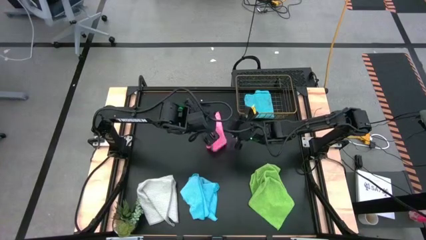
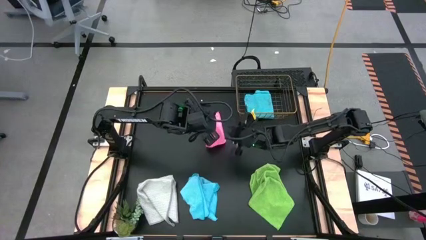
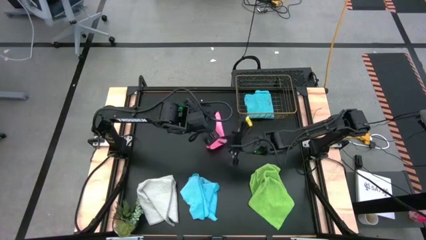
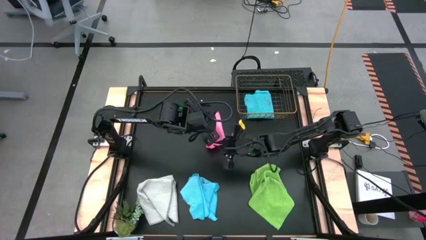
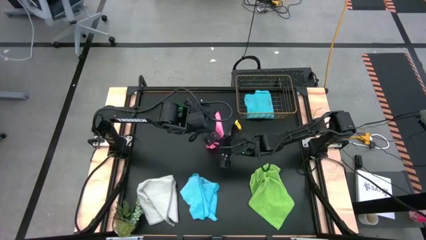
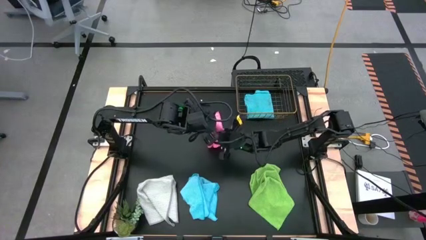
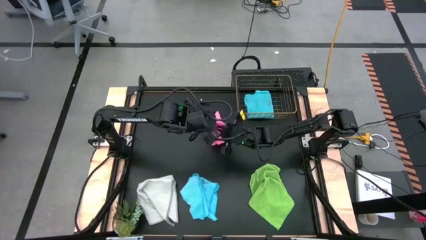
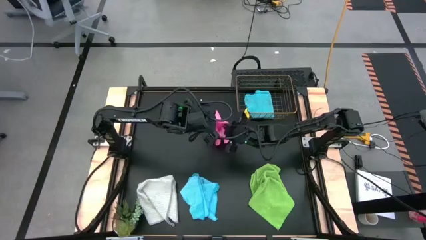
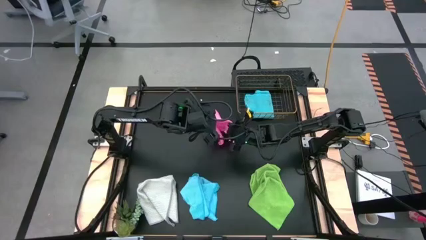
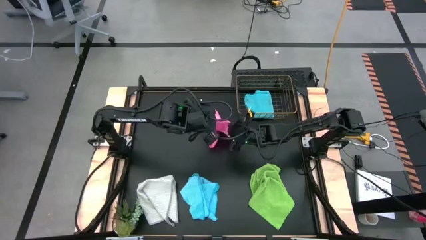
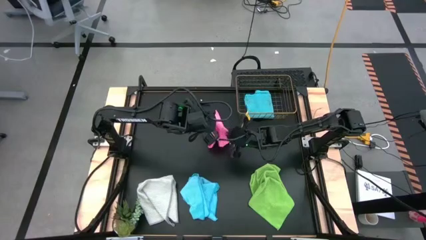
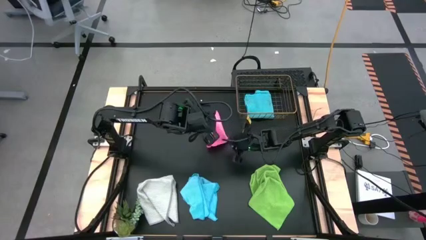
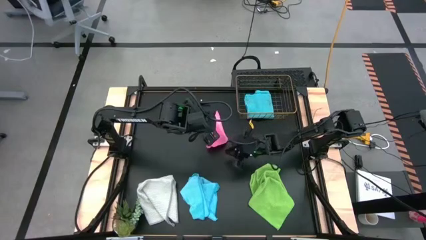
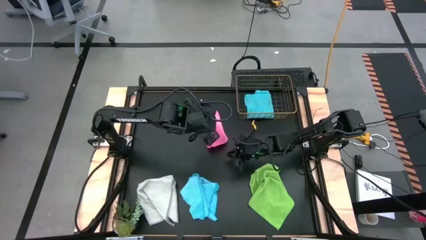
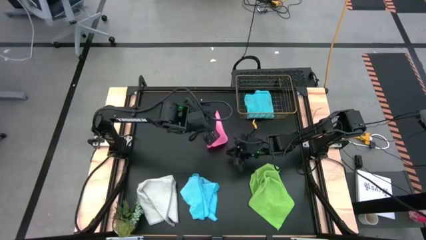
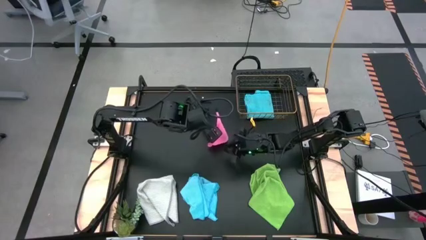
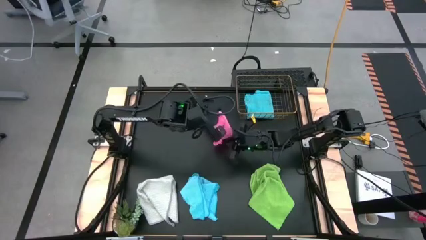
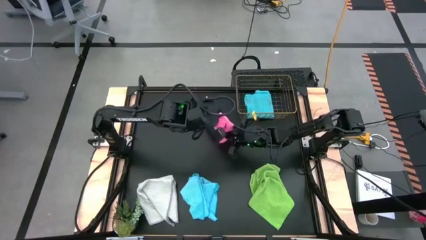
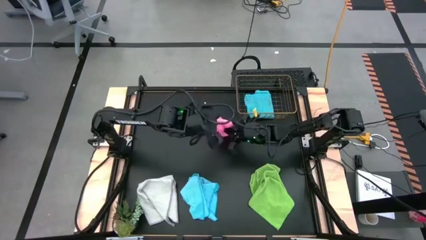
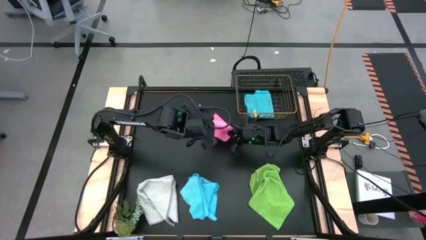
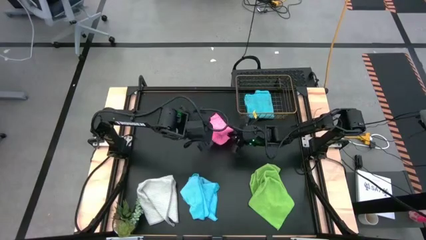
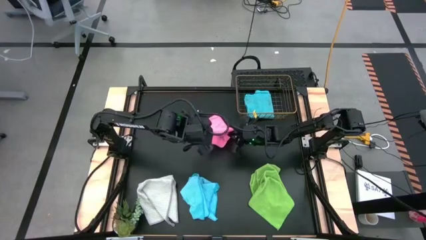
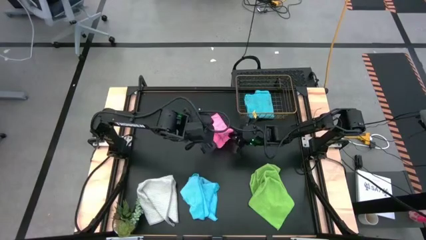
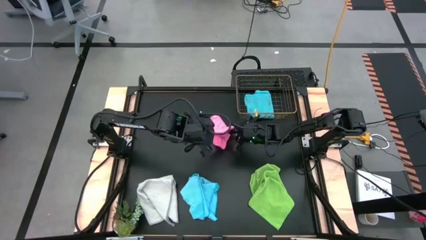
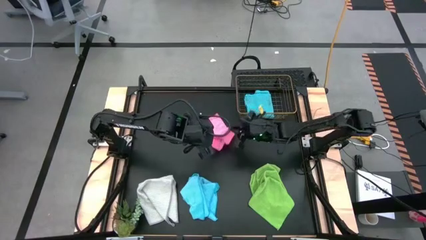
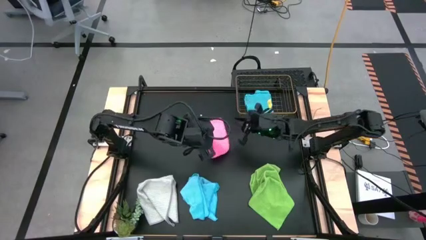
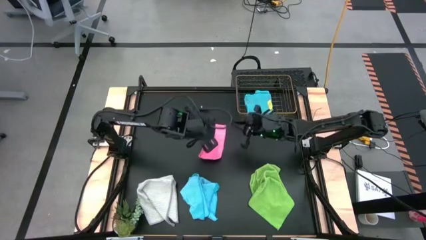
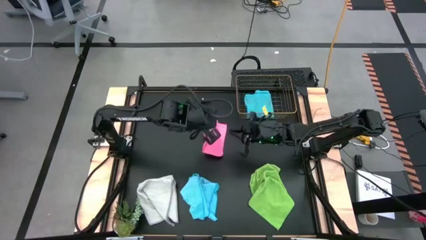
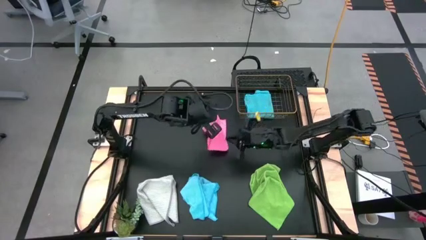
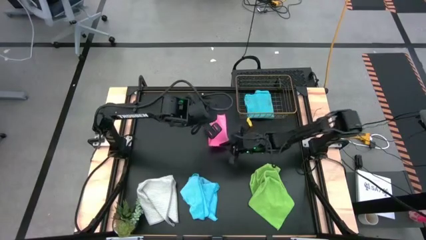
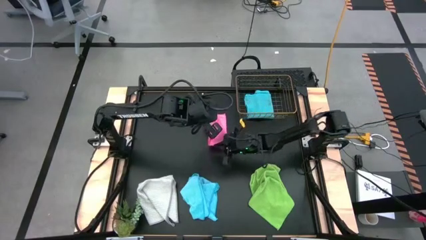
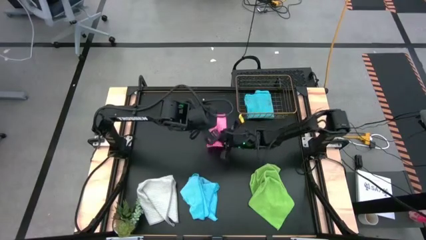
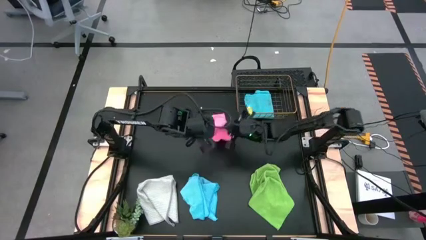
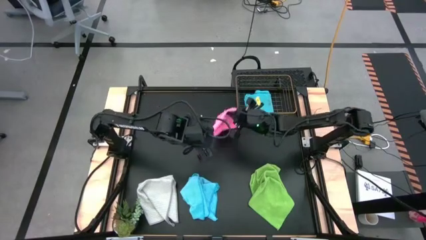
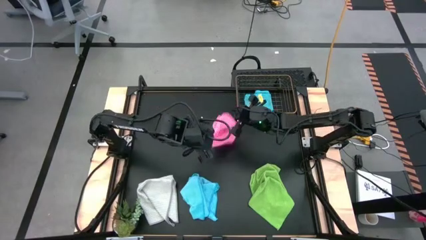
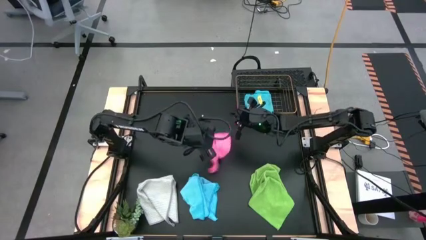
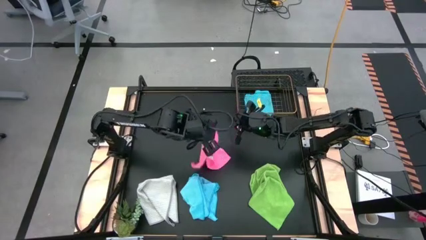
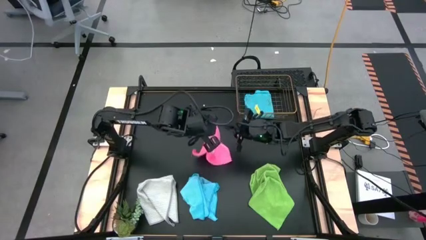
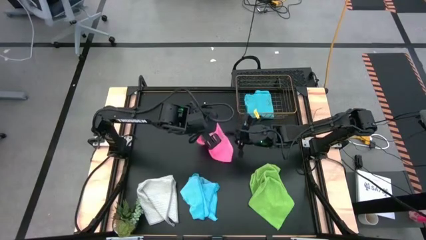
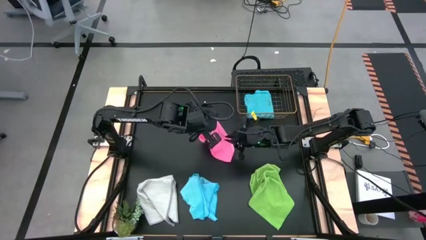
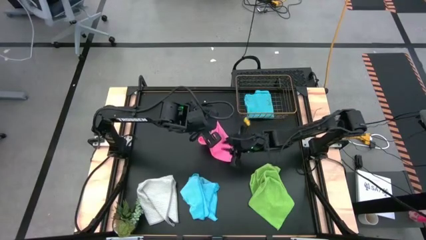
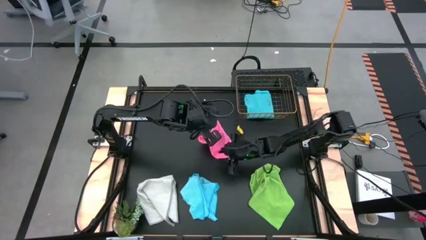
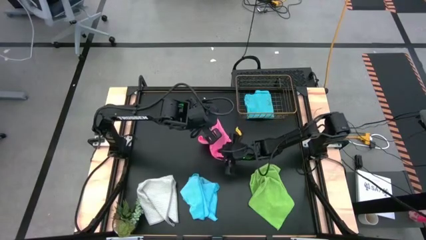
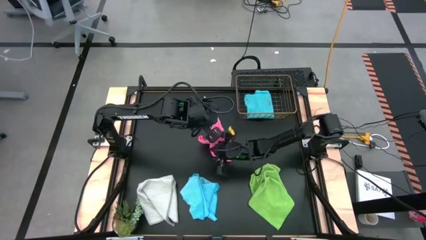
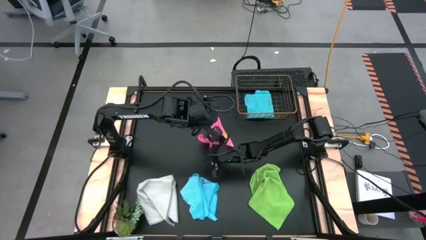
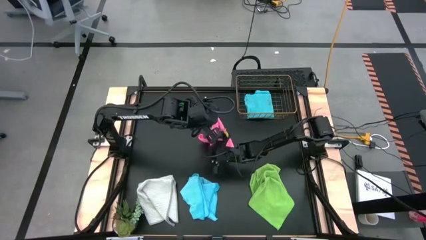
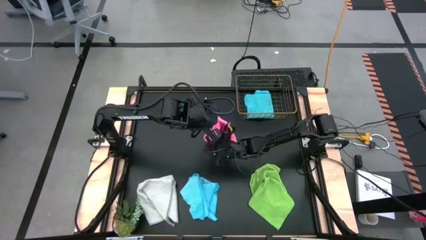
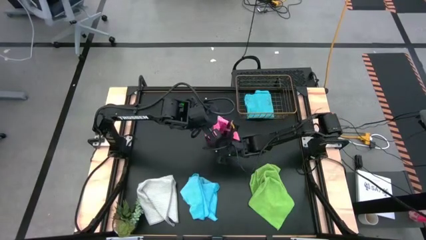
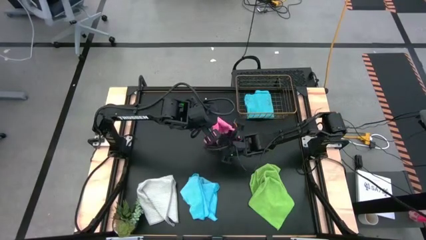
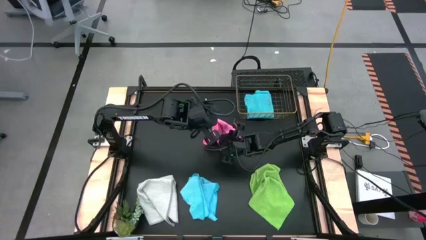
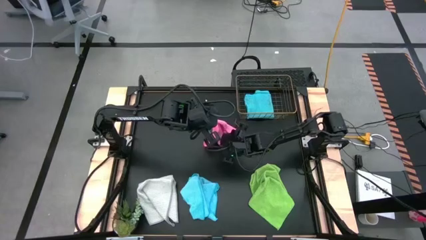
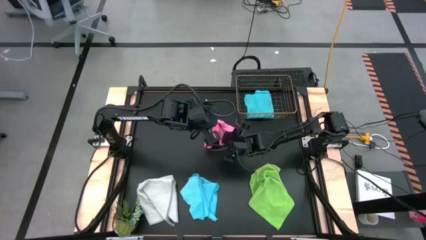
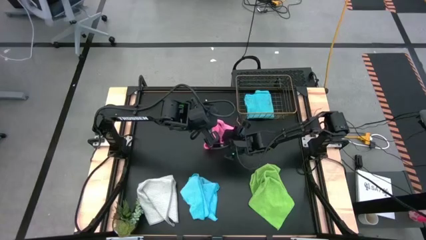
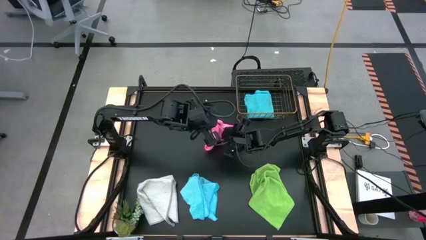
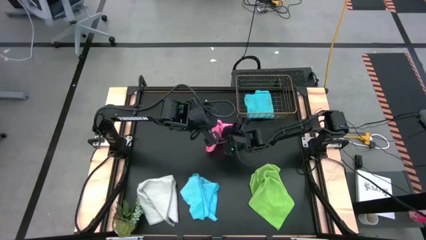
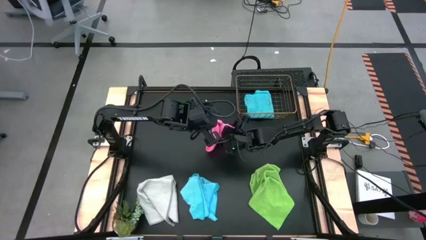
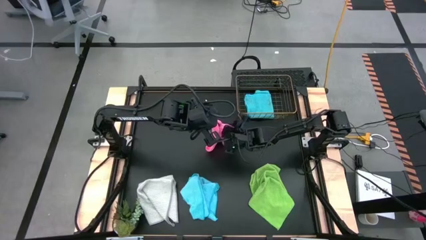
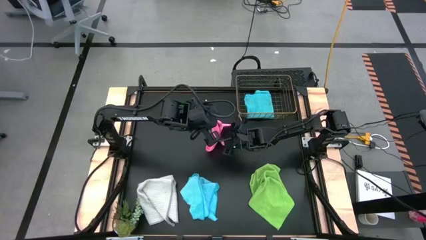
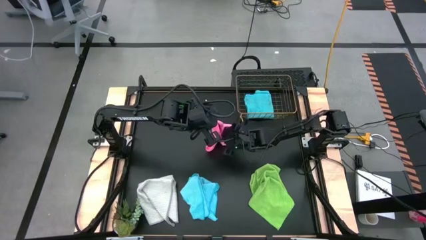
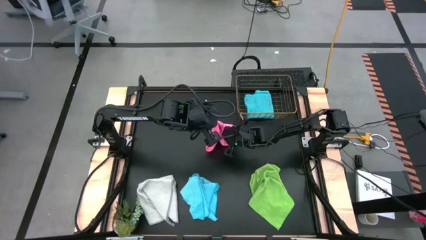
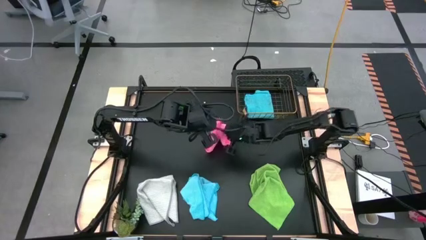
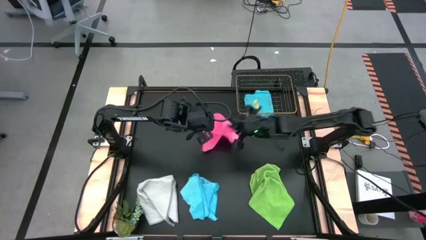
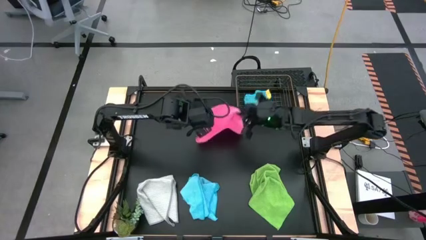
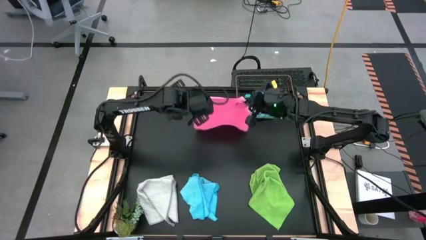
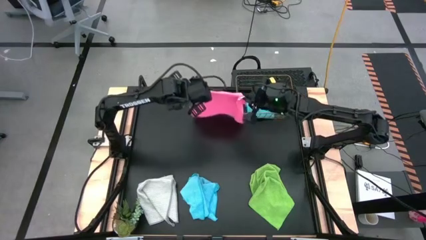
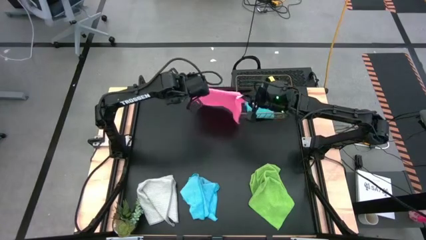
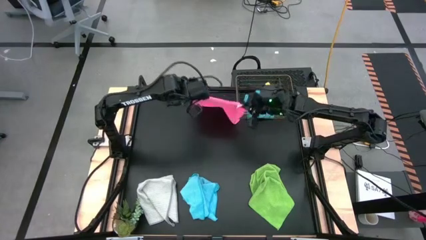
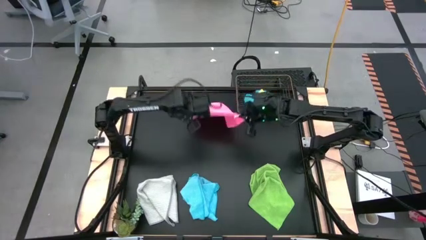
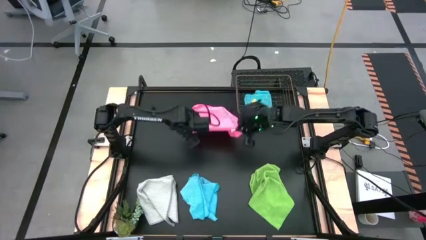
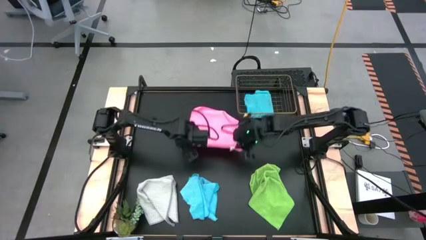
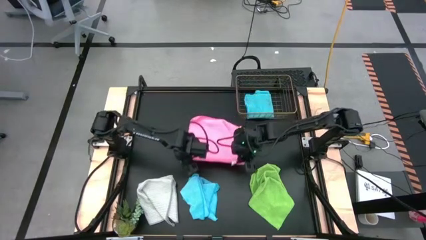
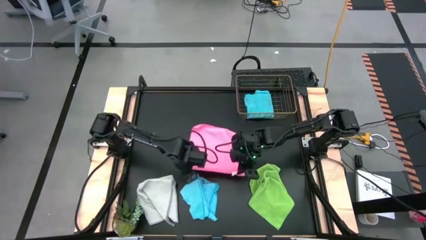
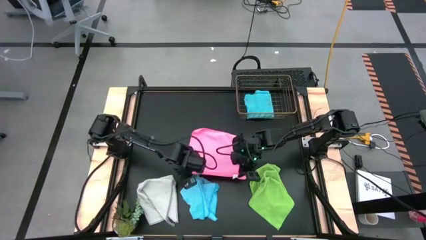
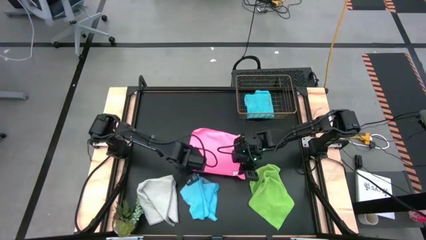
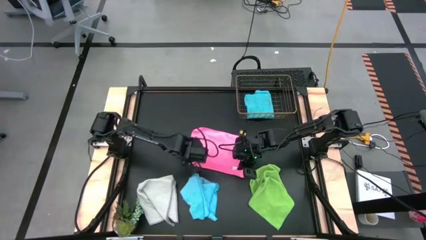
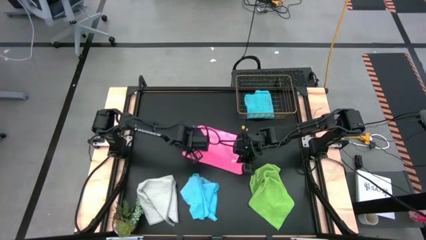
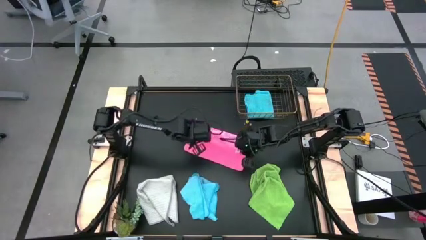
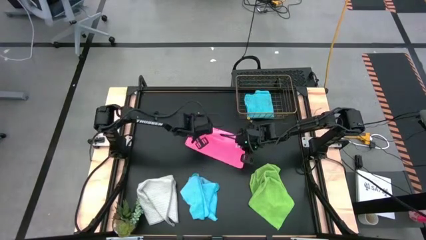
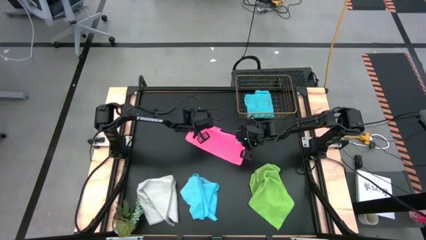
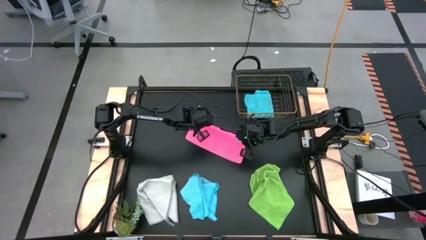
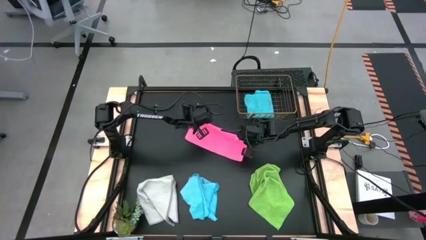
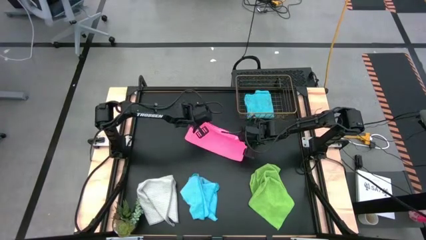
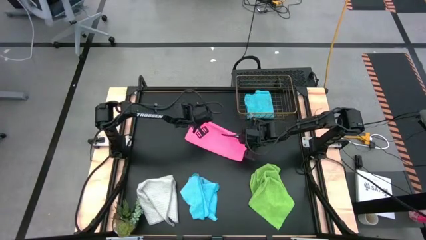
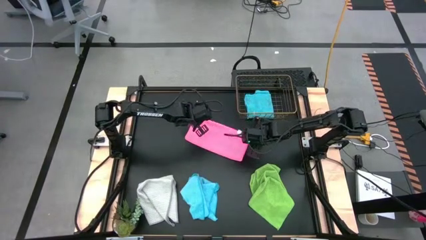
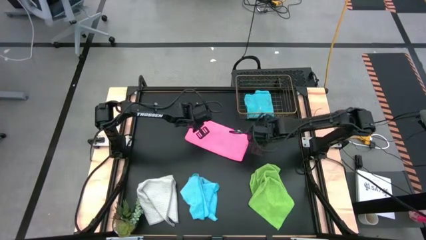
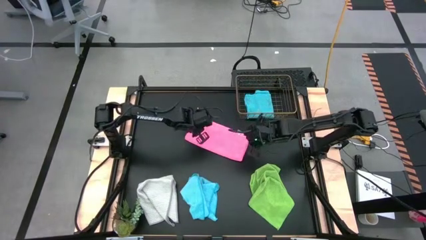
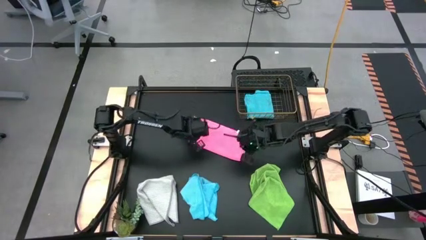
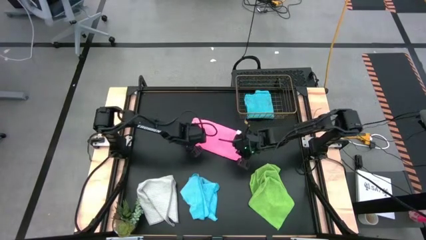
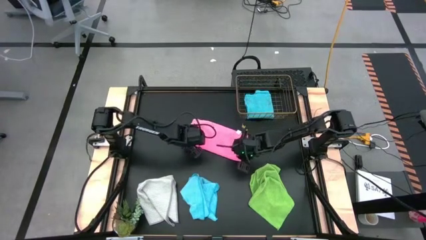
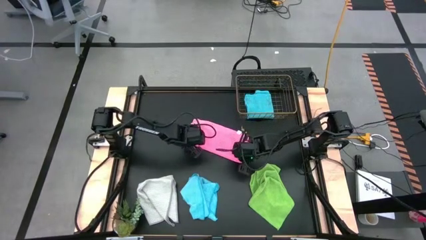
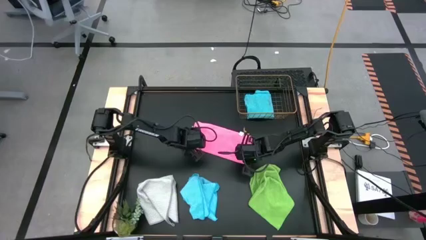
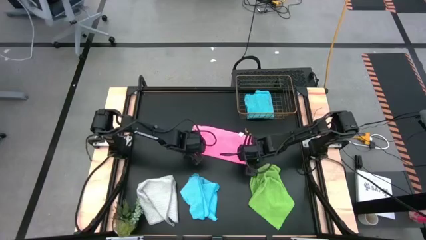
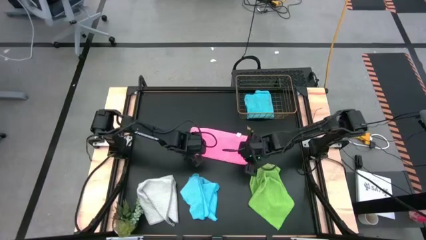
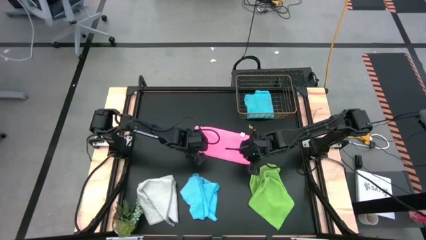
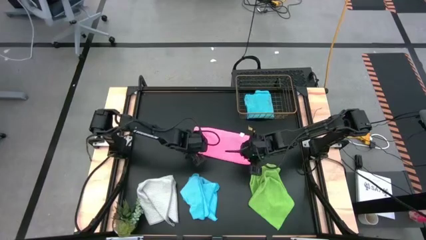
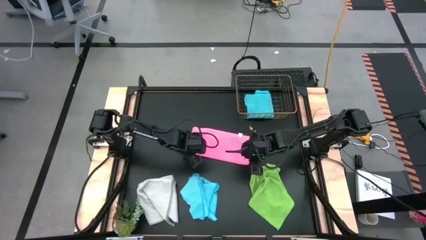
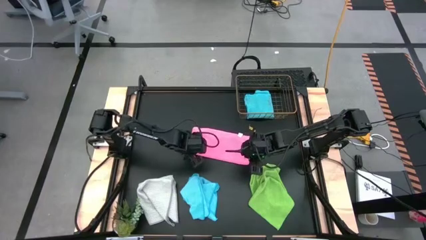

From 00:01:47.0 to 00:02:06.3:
Task: Fold microfiber towels
Fold the pink towel
